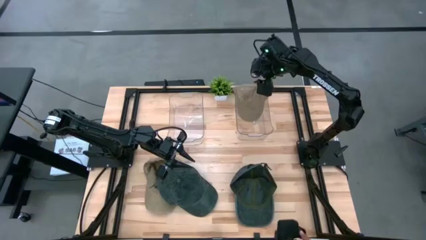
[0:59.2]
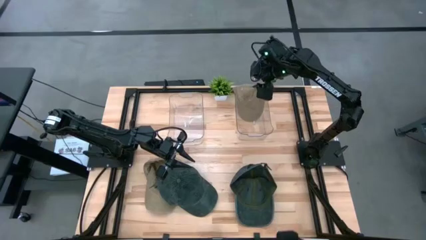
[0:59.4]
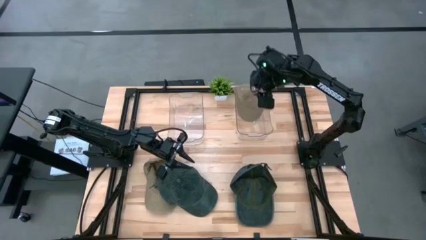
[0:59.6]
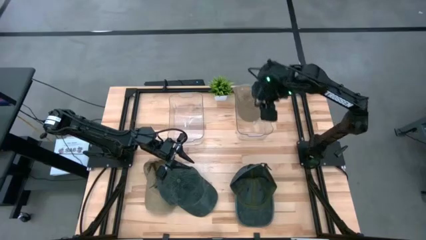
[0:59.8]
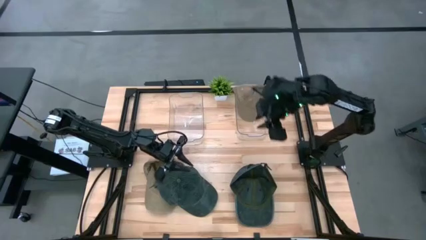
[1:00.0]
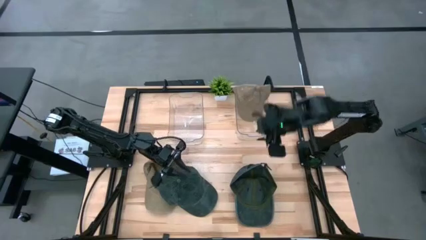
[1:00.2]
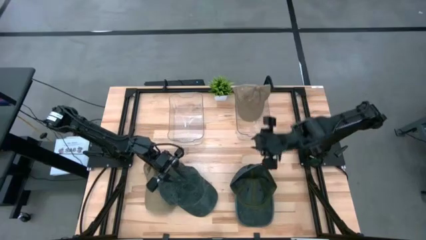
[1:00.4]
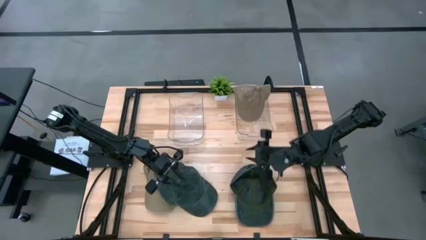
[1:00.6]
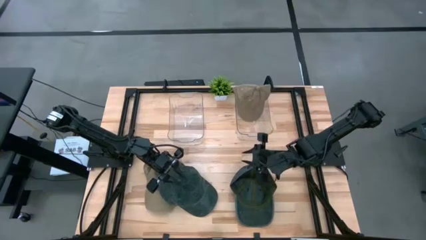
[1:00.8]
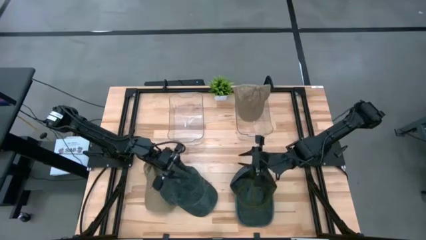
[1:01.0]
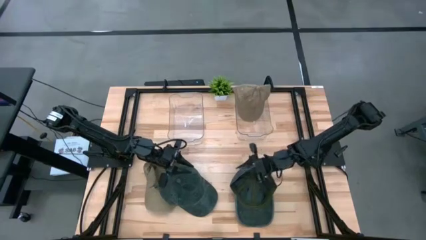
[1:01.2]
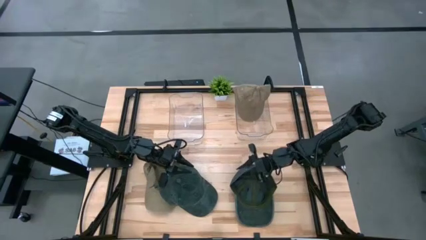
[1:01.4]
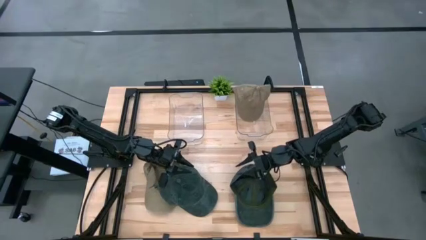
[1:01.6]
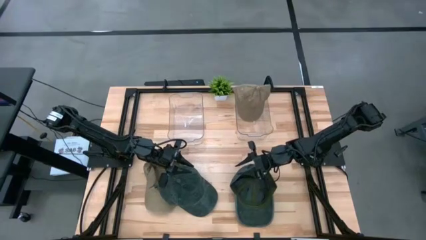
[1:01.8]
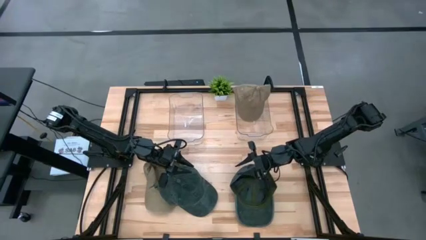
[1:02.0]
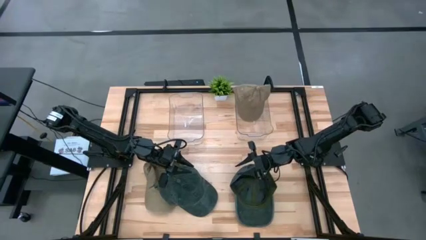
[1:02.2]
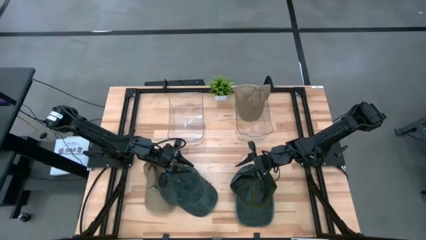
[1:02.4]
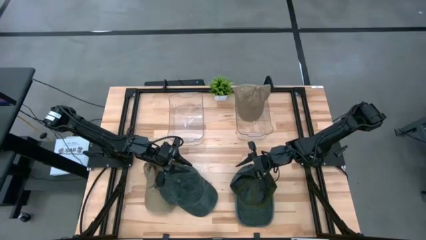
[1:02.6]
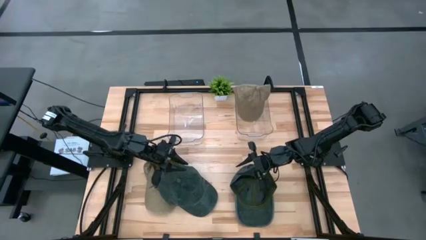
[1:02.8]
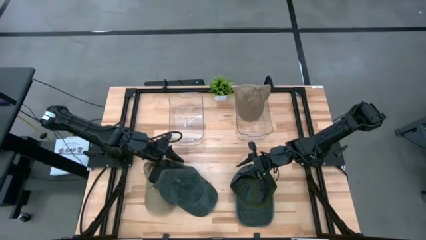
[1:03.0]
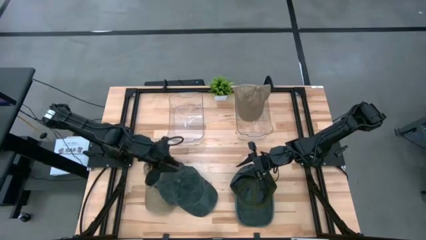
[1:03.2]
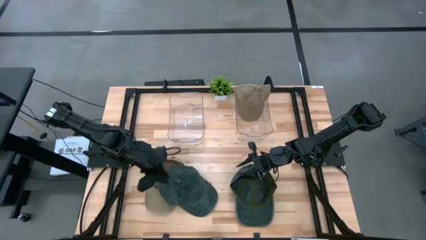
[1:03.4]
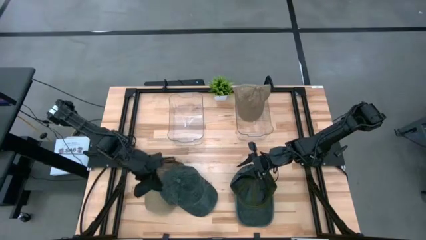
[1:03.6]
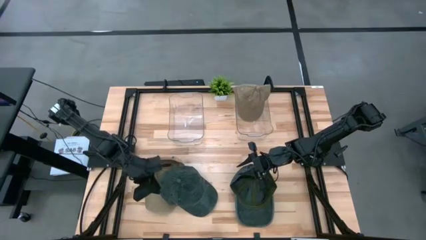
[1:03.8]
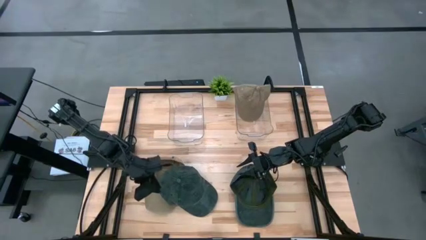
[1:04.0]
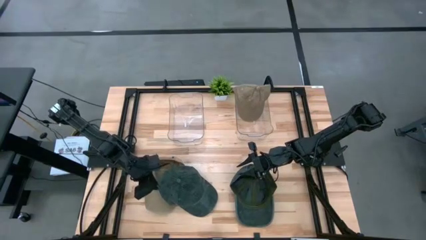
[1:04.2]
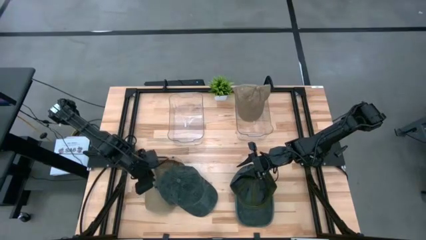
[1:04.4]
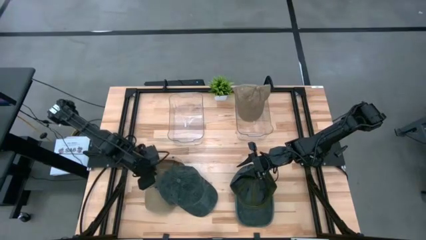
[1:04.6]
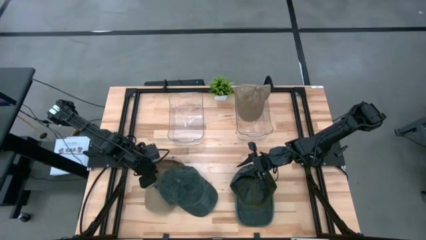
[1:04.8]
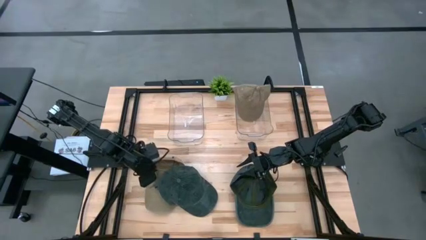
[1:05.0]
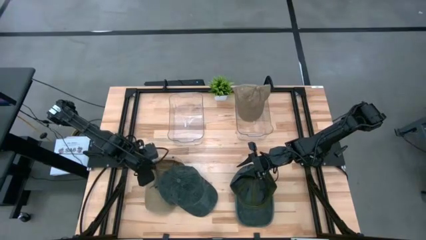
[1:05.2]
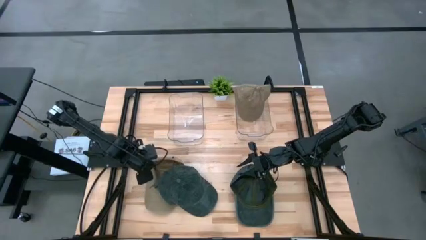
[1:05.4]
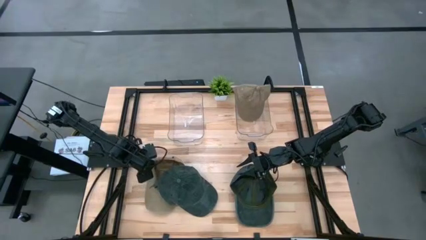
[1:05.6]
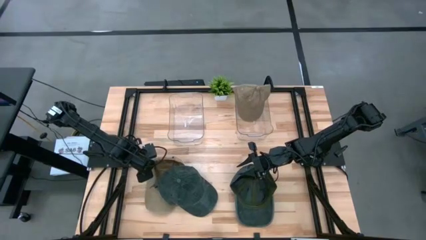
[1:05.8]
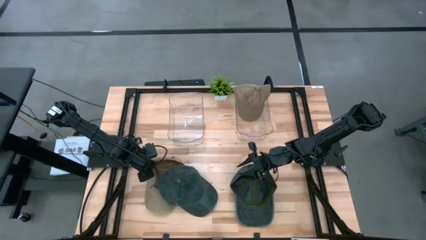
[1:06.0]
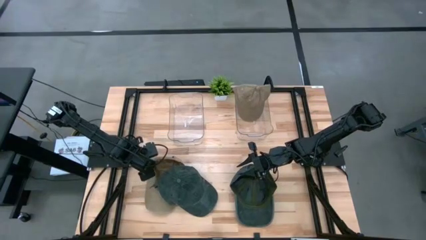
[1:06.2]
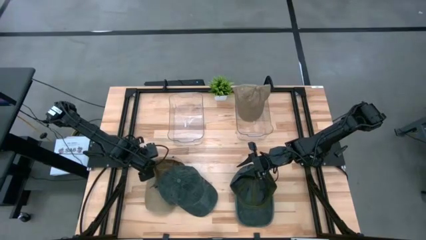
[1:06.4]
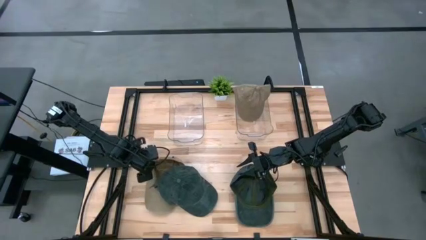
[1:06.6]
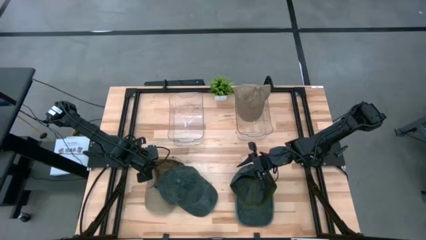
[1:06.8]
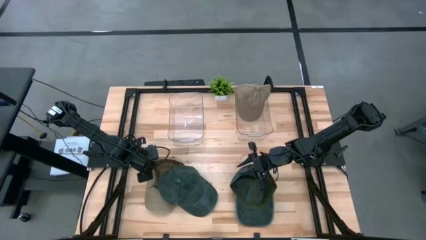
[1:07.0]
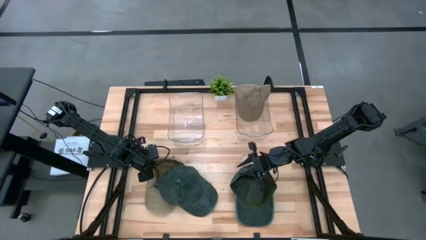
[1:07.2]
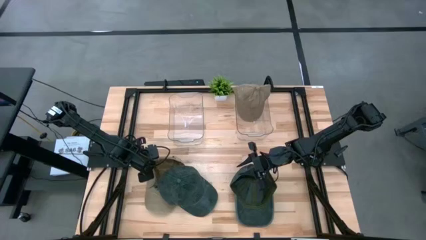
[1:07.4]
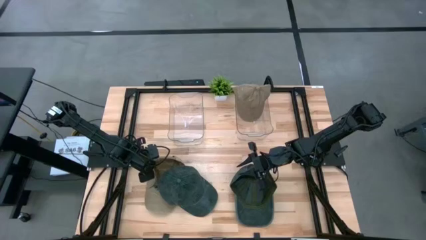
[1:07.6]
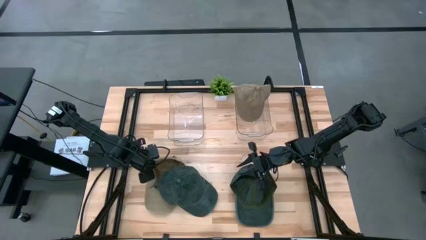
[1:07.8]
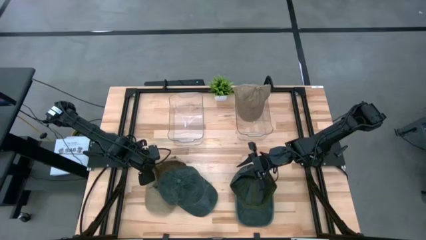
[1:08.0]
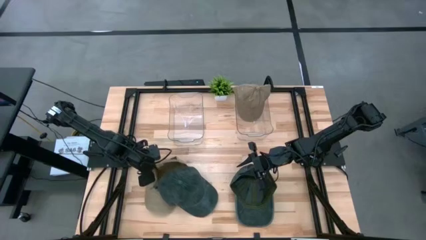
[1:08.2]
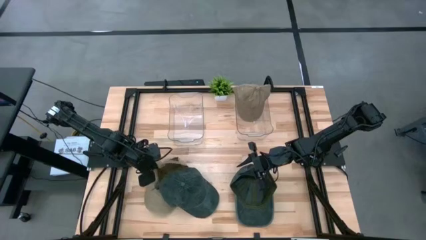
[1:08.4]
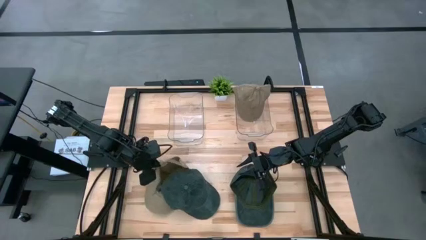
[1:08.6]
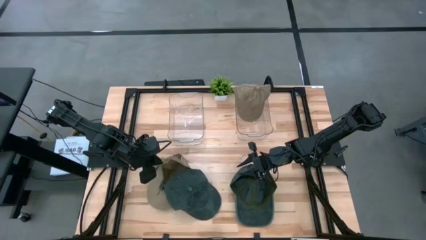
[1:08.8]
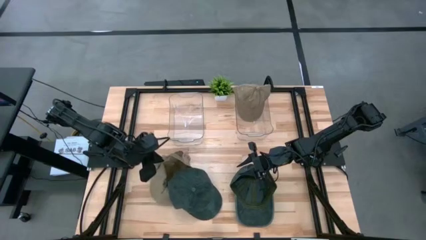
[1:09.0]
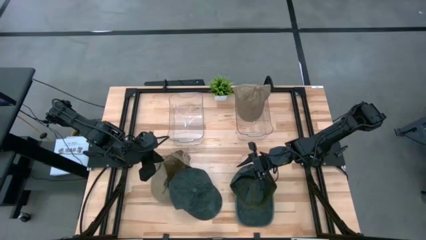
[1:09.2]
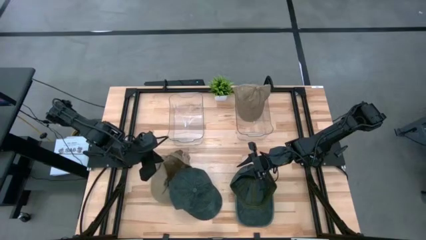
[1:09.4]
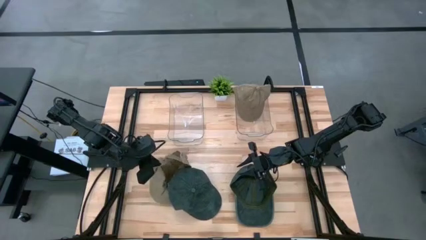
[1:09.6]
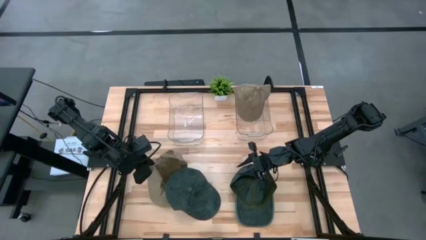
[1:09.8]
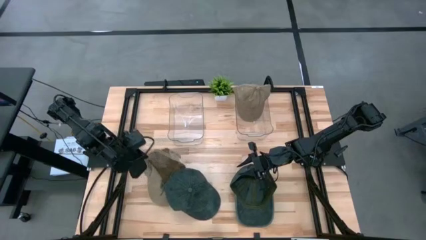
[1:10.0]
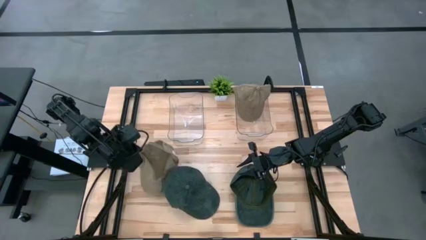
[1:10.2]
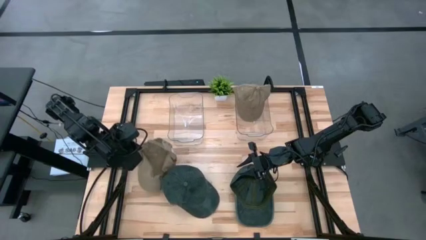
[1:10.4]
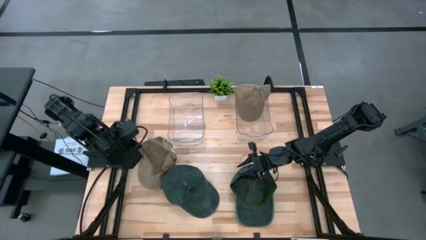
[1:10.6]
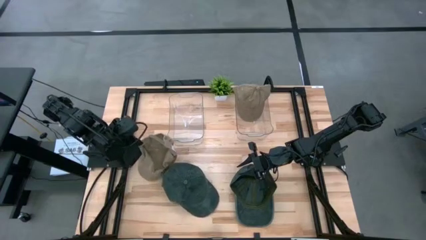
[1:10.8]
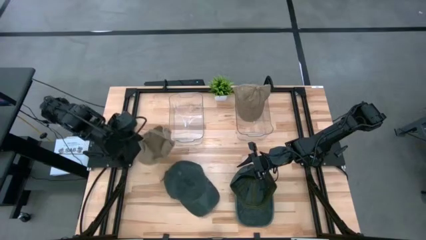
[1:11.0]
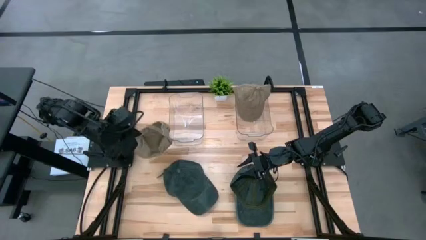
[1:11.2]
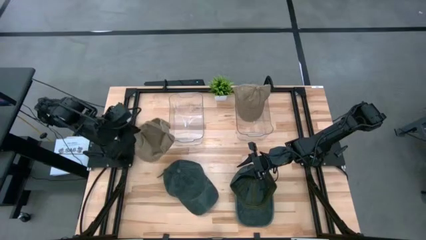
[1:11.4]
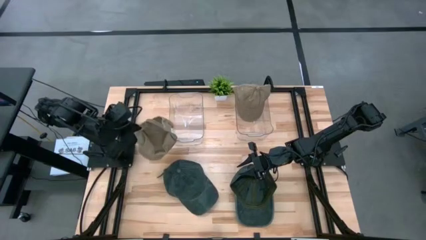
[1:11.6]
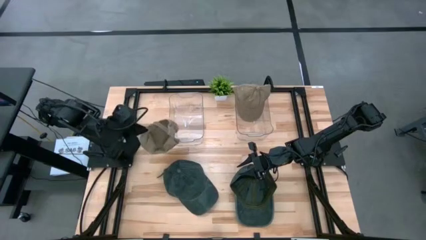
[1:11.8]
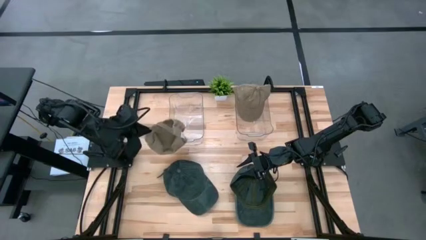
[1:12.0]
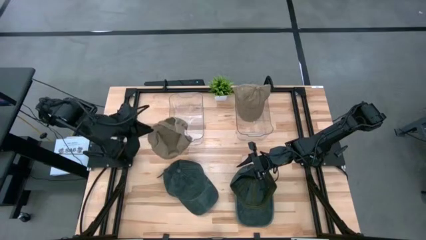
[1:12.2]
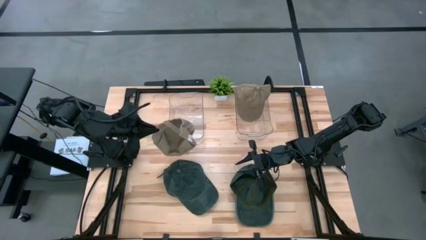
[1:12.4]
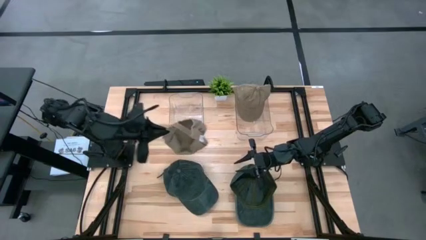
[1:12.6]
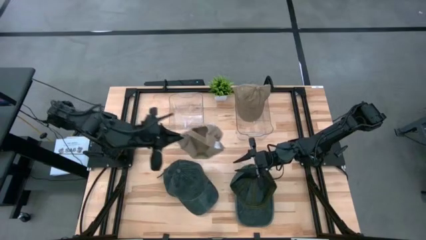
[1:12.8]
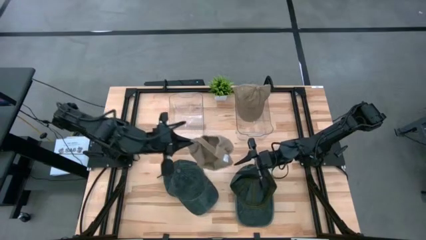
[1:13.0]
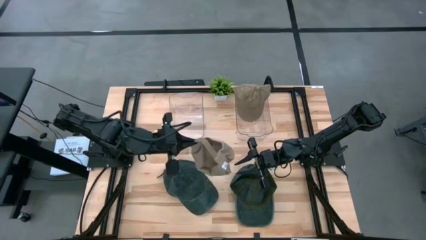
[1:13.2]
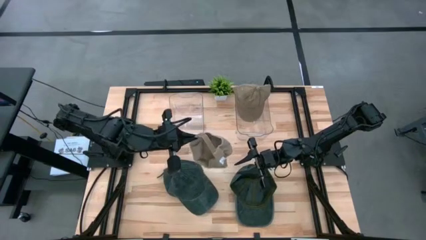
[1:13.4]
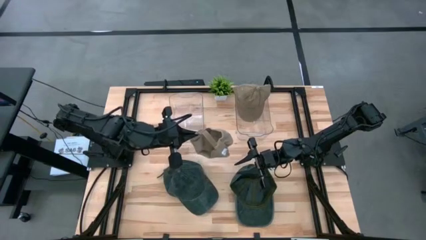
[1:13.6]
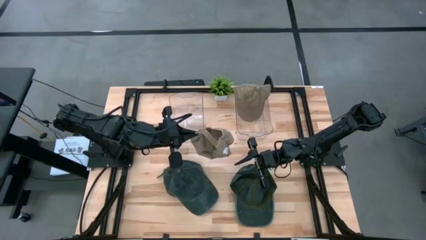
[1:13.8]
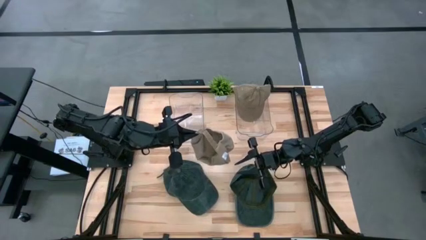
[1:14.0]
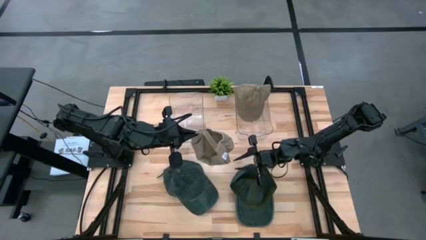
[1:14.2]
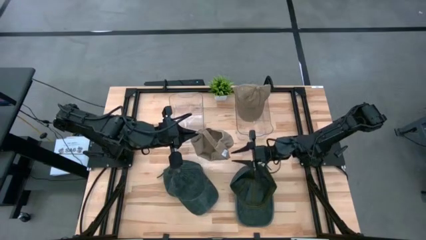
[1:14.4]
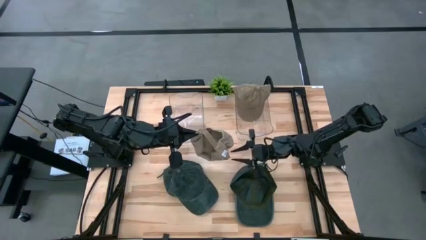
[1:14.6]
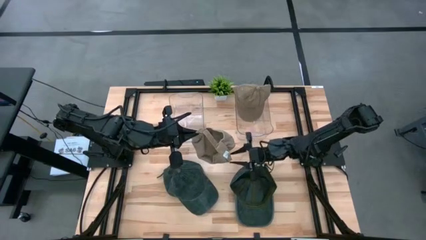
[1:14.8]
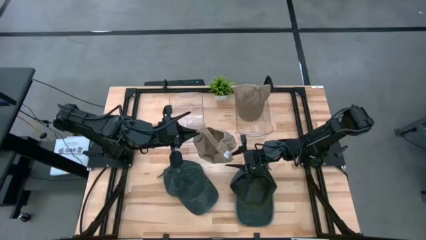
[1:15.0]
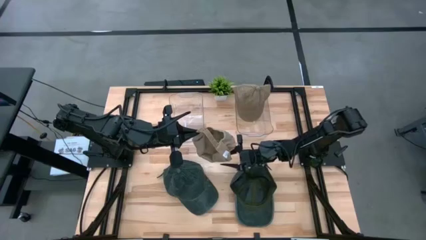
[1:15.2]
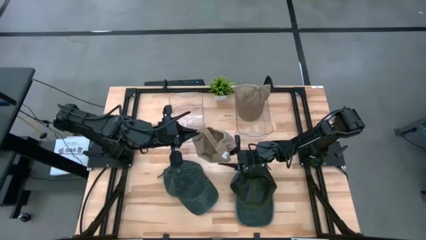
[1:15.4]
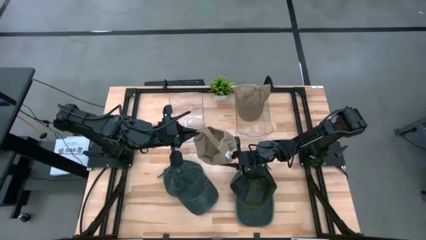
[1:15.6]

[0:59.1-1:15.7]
Task: Pick & Place hat
Put the brown cap into the right transparent bin
